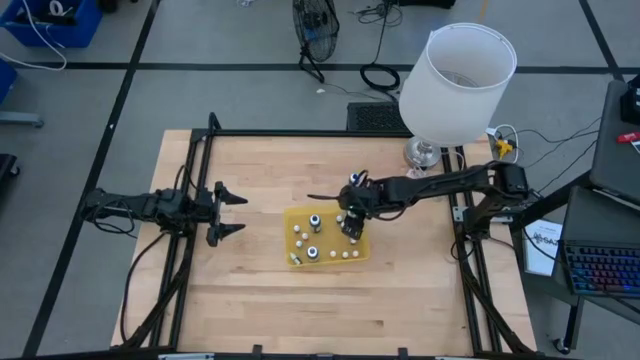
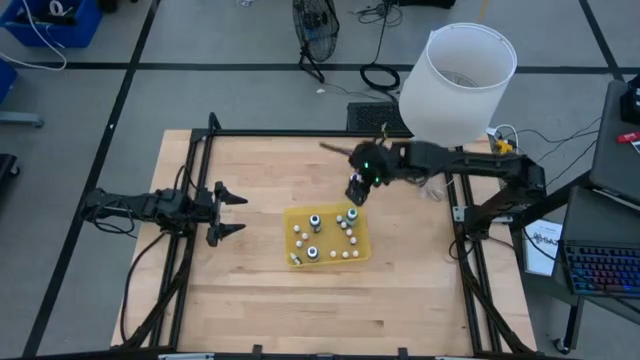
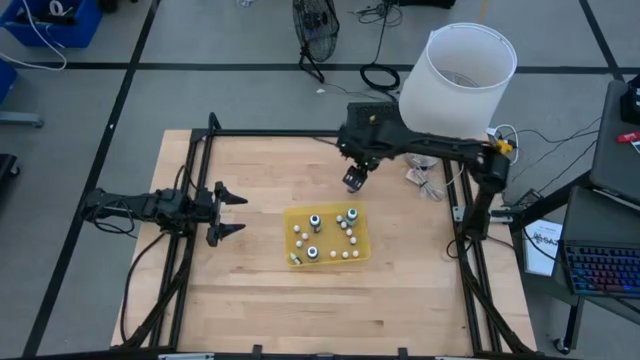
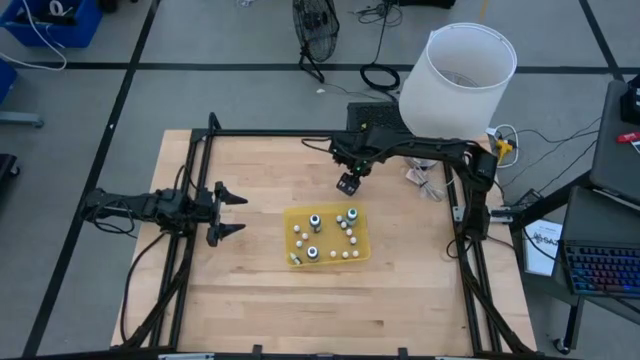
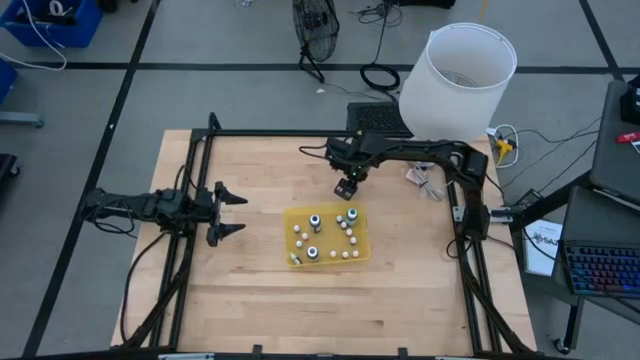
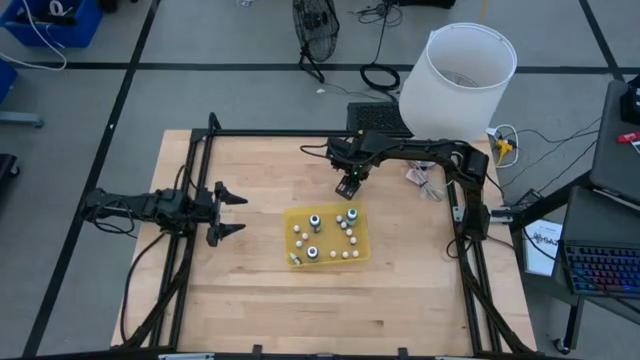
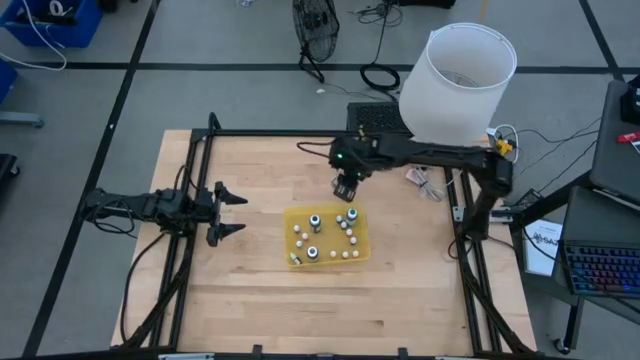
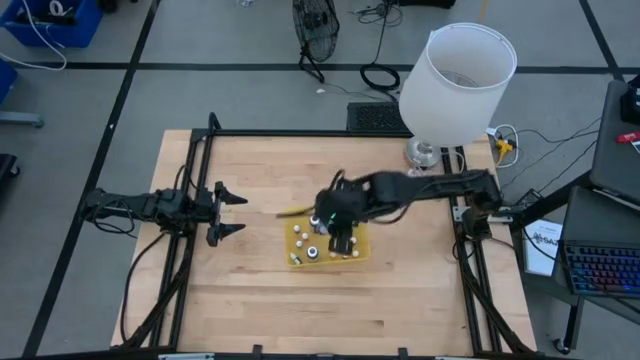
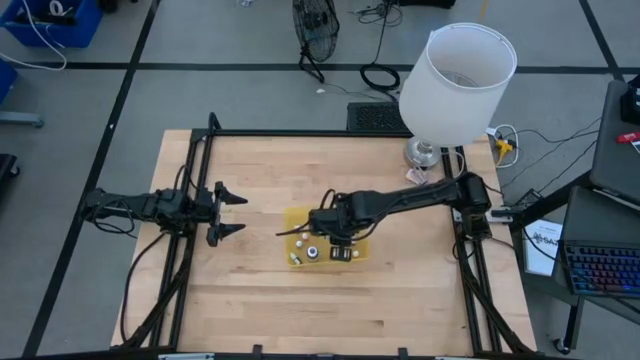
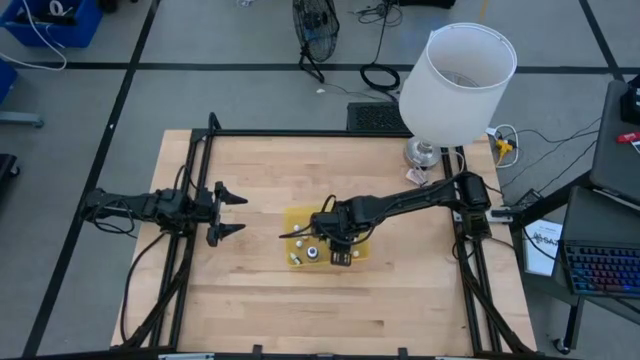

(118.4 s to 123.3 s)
Task: Pick & Place food coloring
Put the big blue food coloring bottle into the yellow container

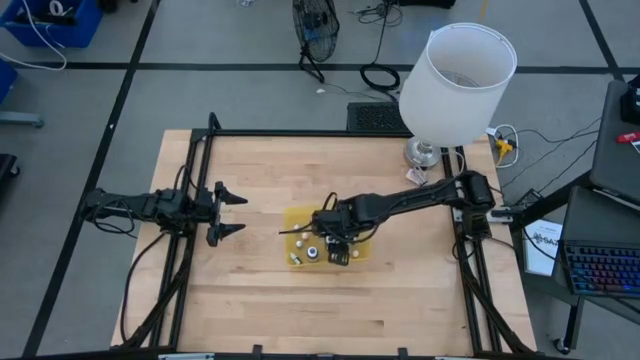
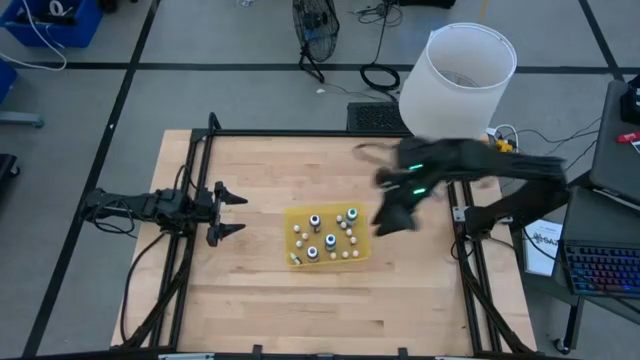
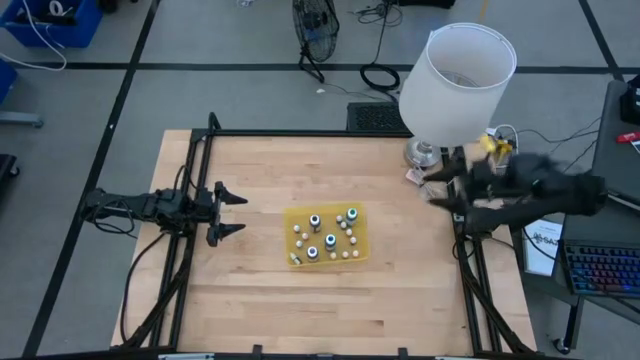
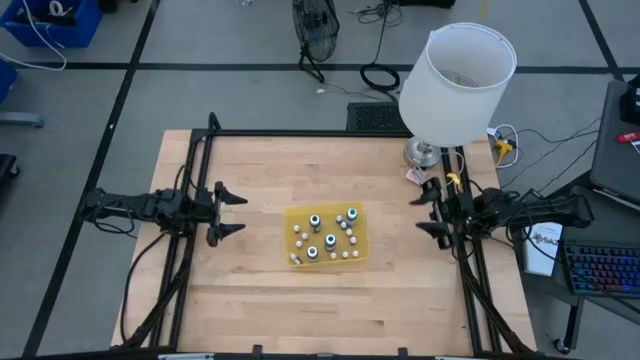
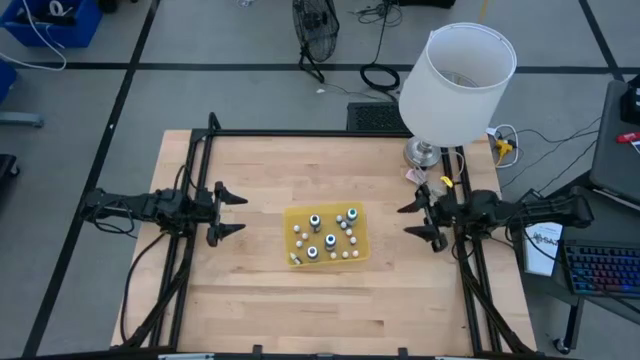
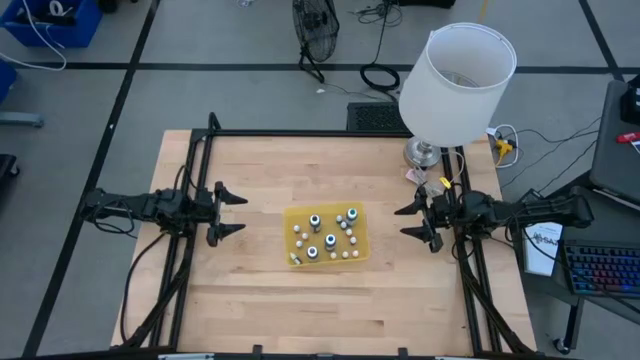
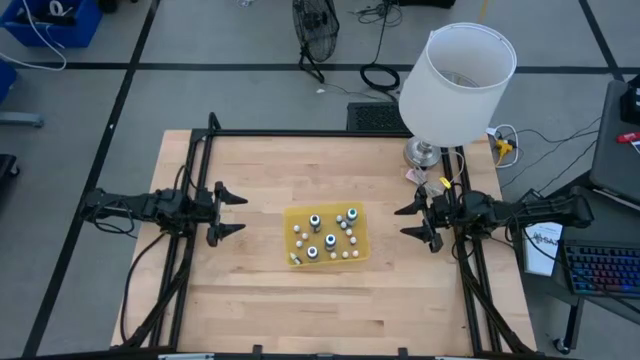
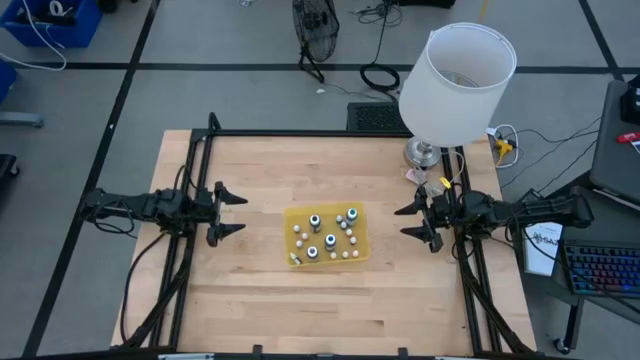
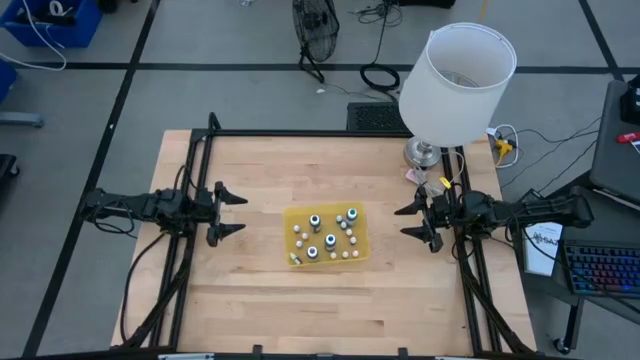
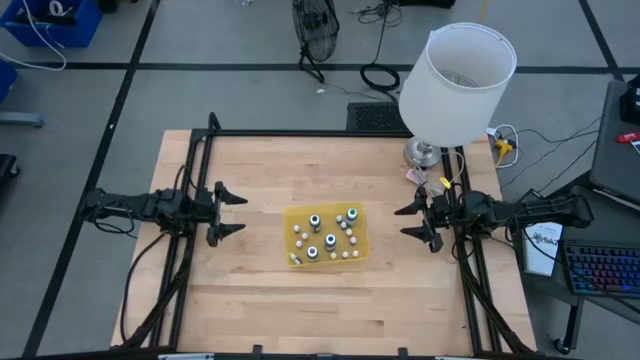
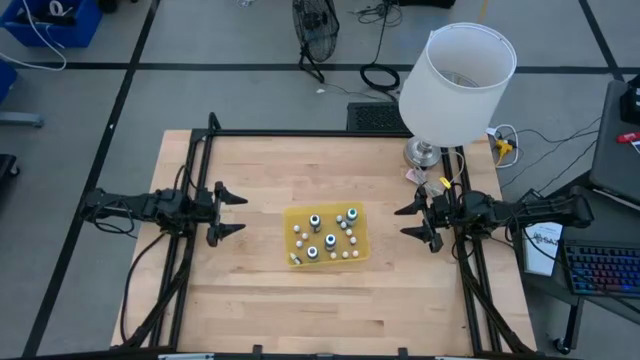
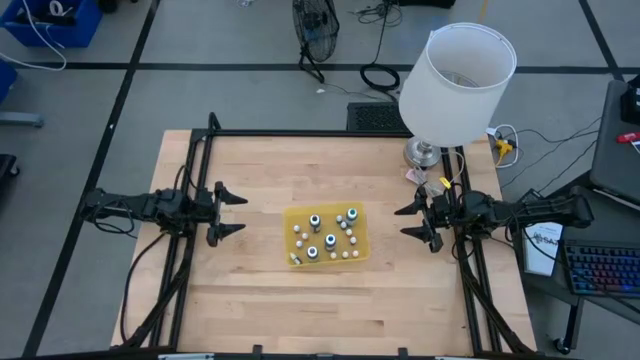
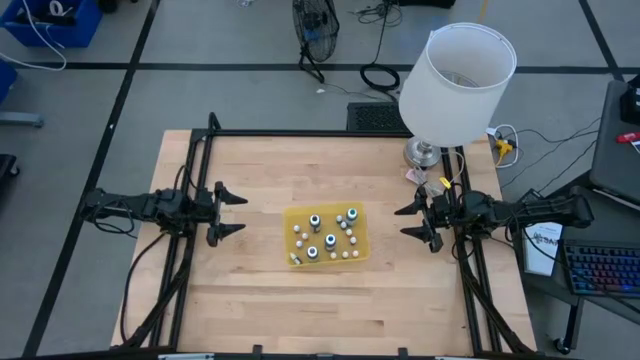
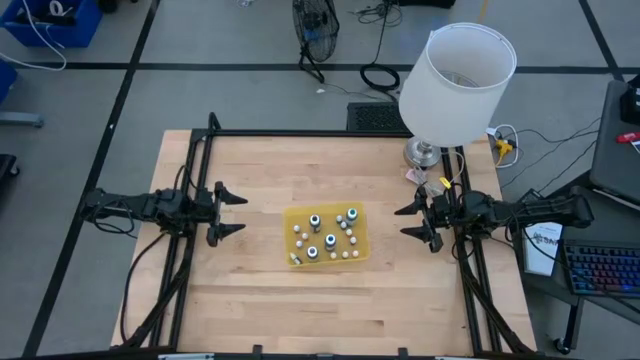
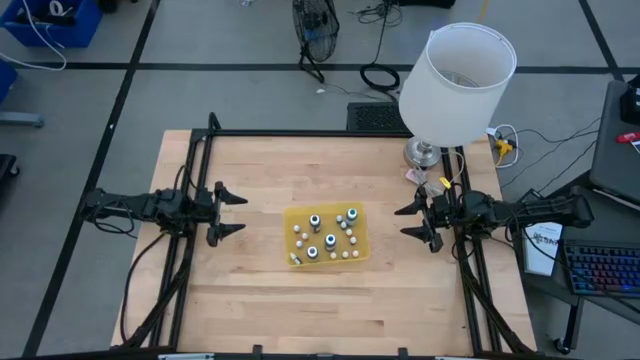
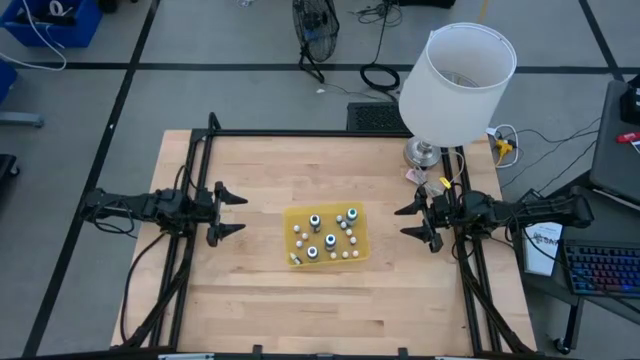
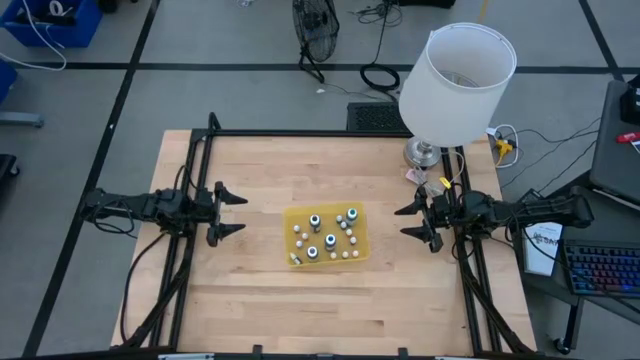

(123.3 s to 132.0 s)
Return to Home Position

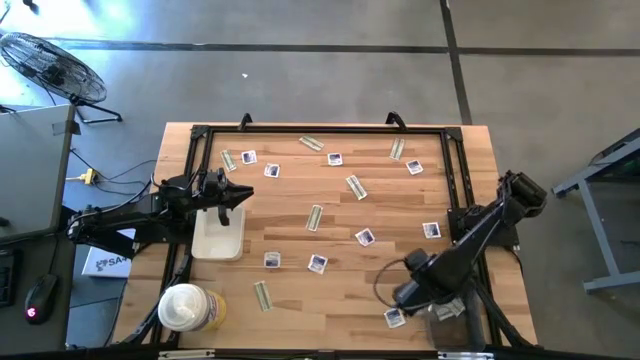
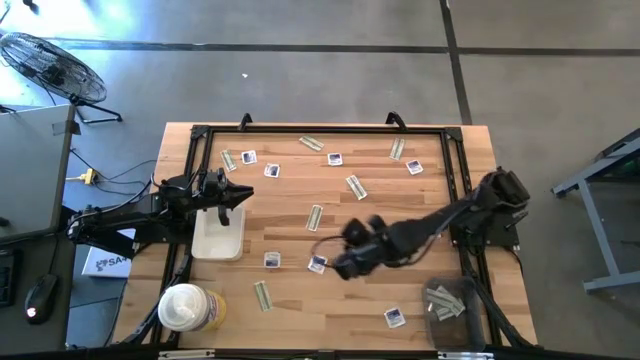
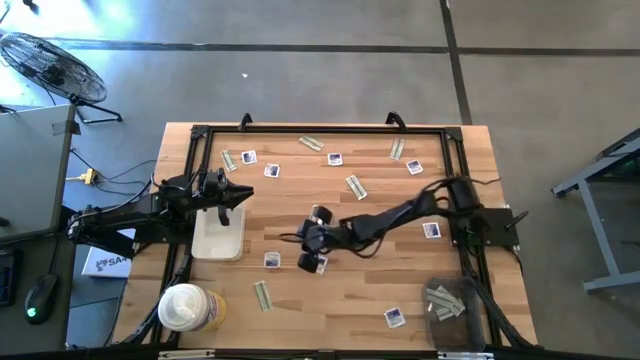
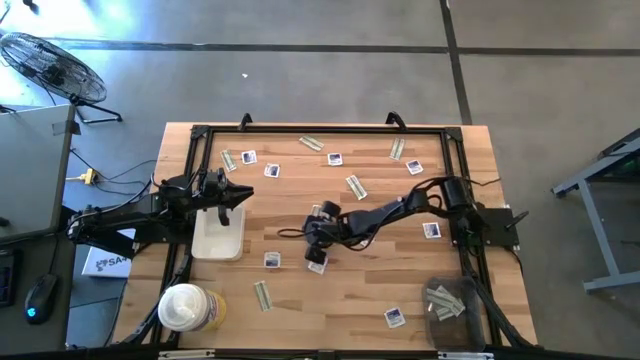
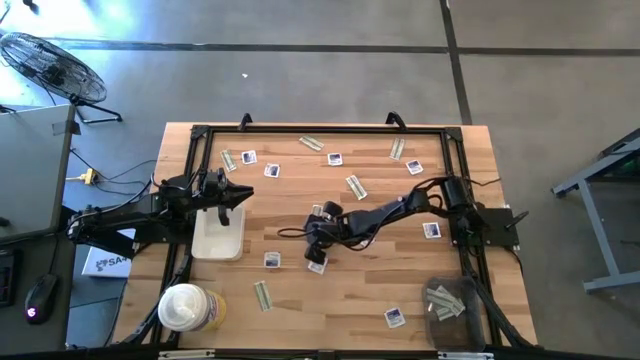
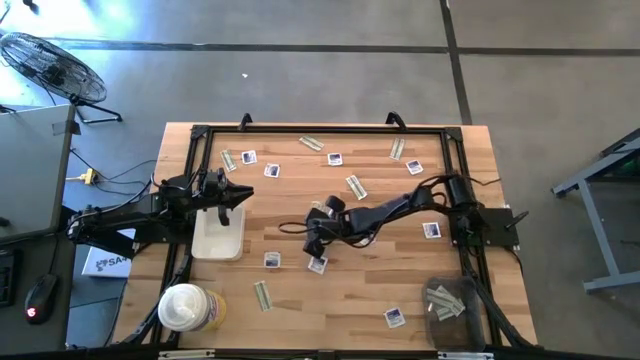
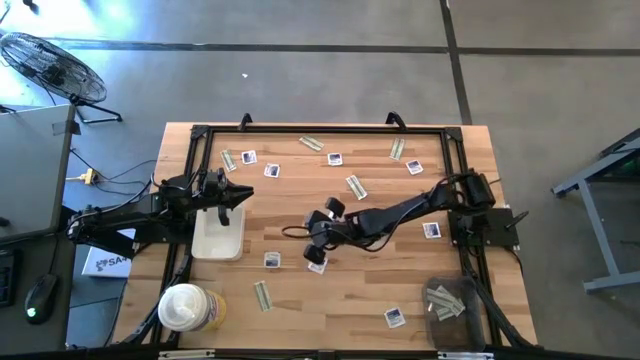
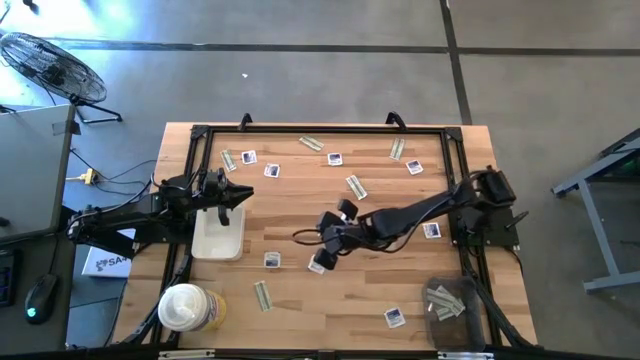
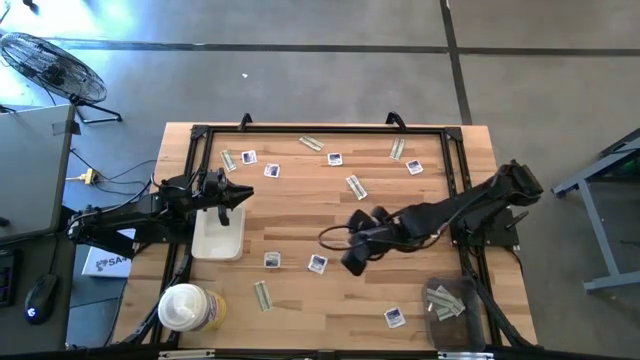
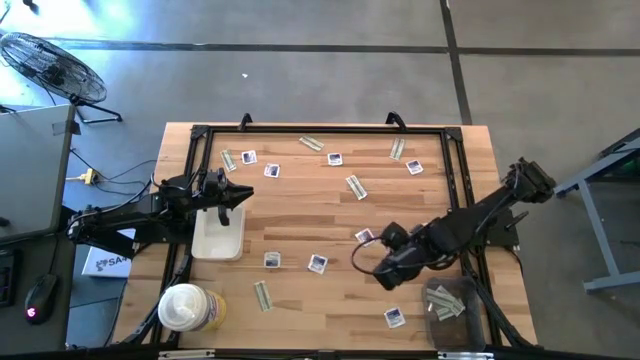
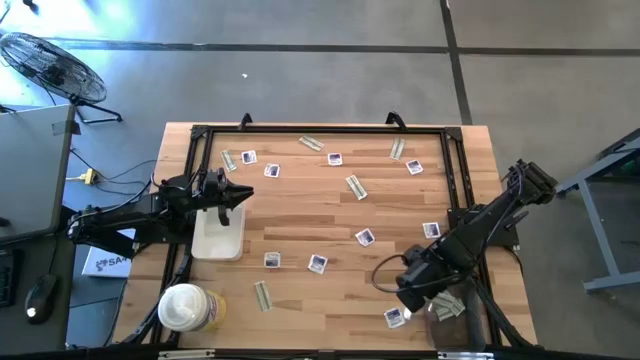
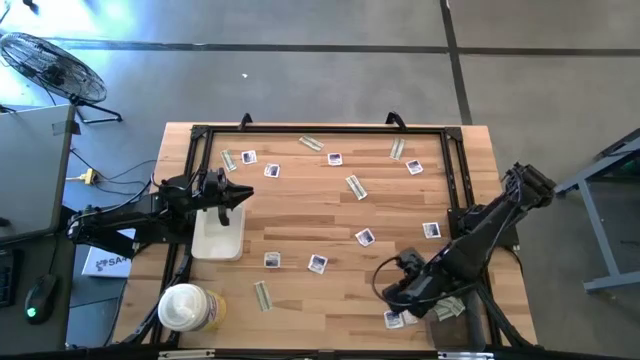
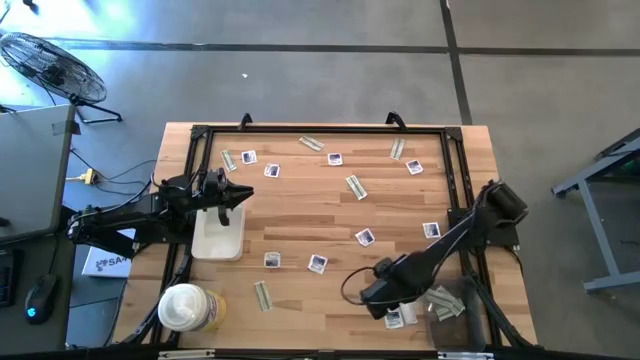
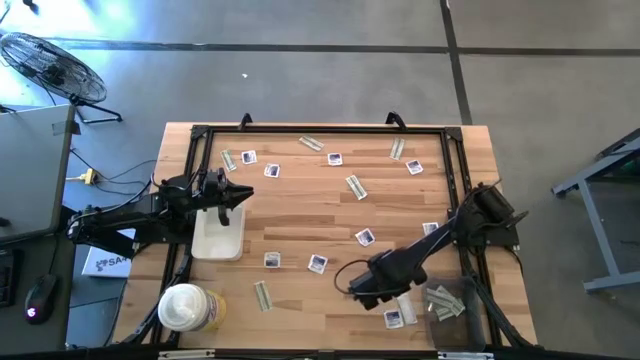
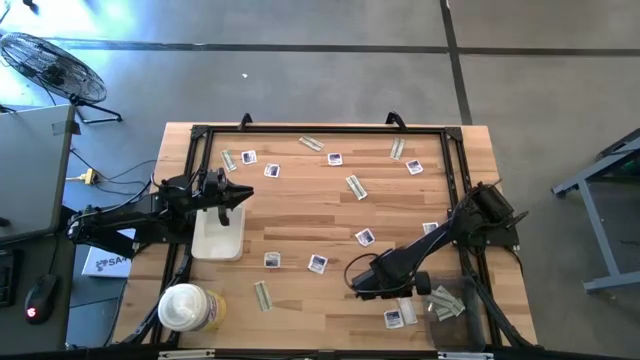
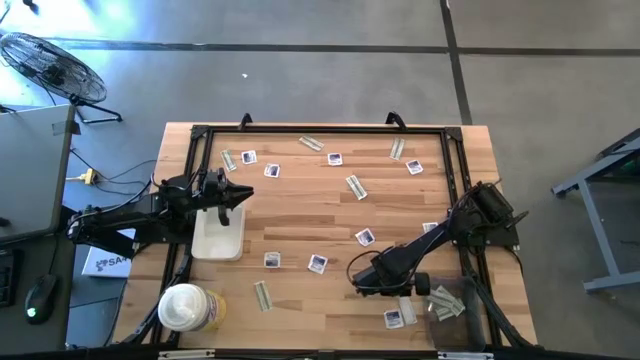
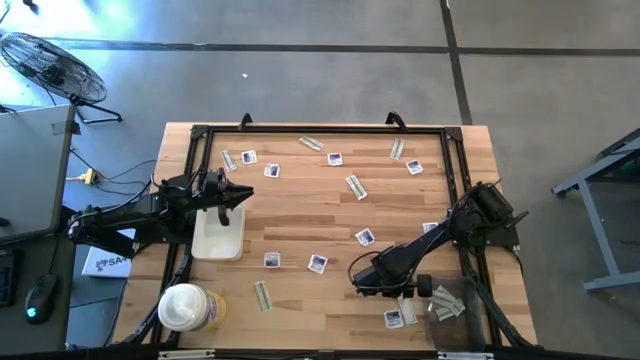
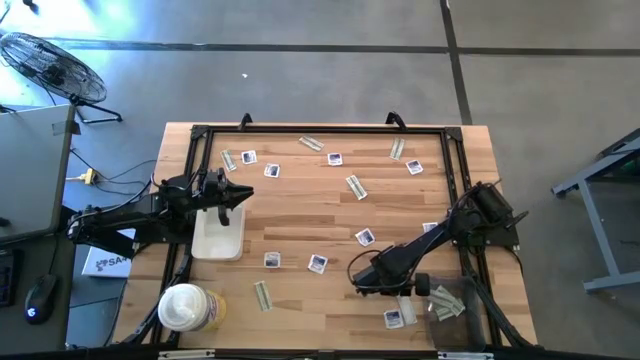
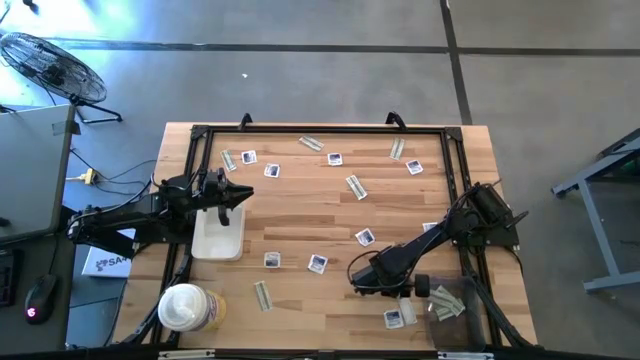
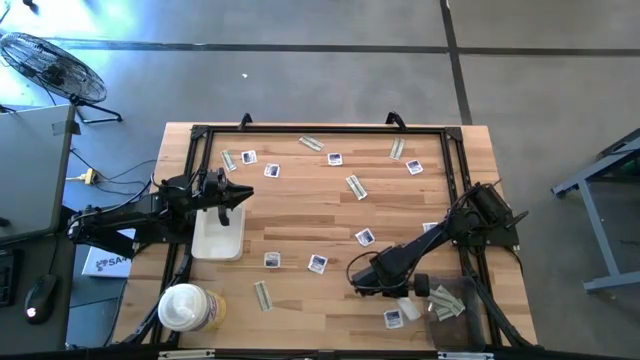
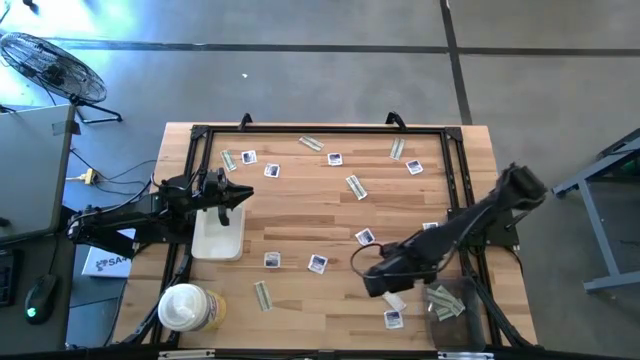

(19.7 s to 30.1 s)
Task: Pick & Place First Aid Supplies
Put the green bandage pack into the black bin
